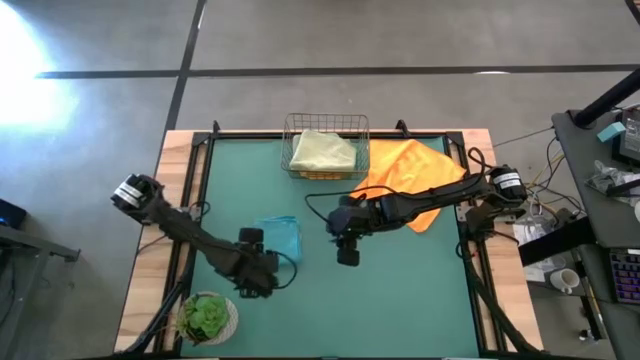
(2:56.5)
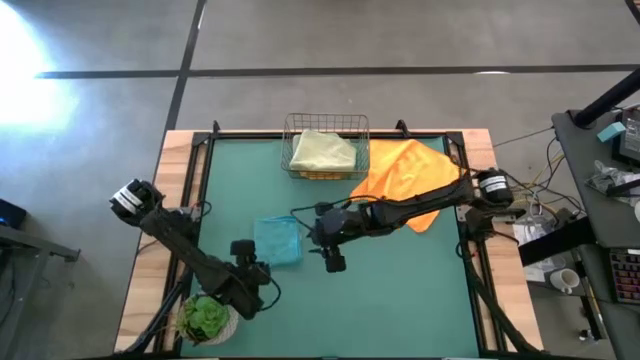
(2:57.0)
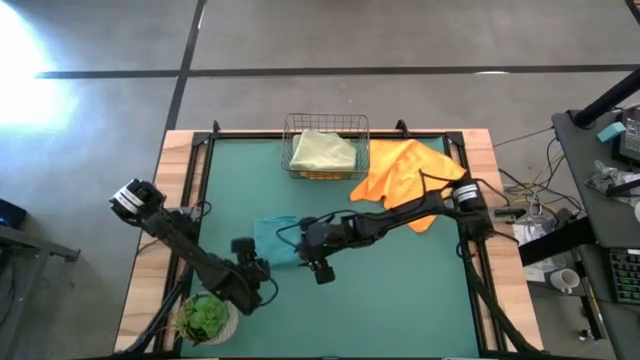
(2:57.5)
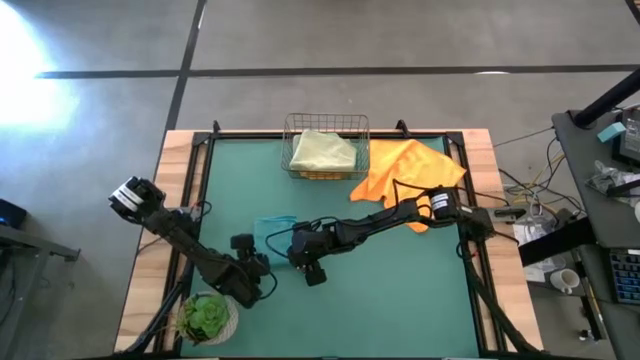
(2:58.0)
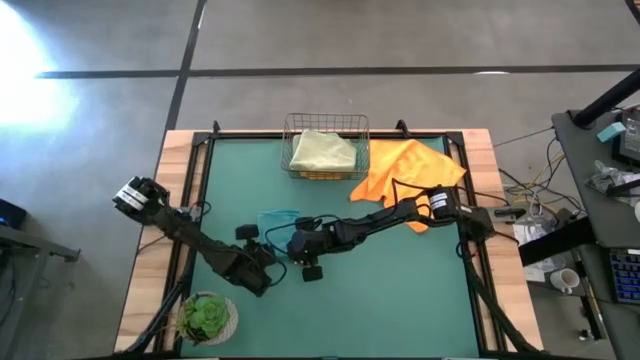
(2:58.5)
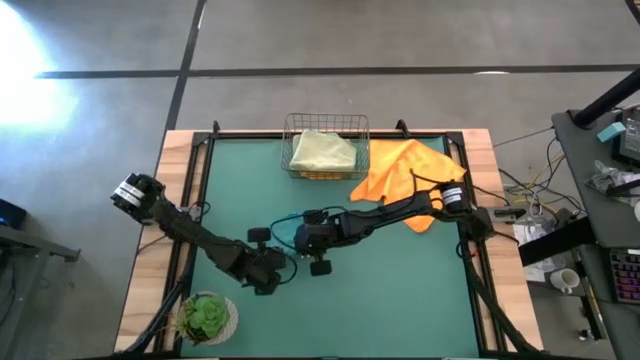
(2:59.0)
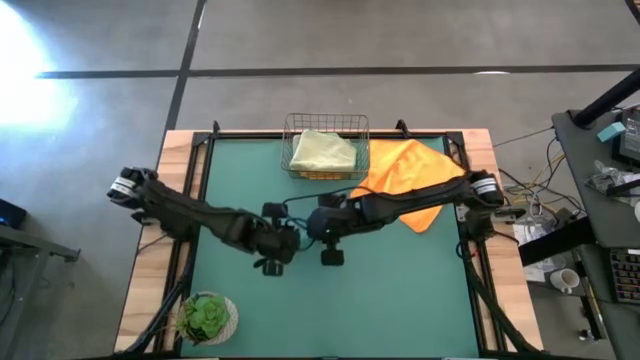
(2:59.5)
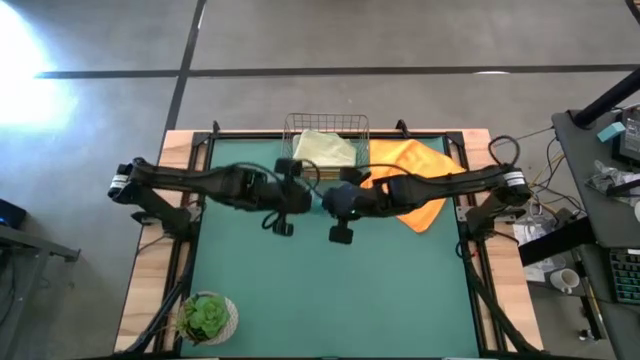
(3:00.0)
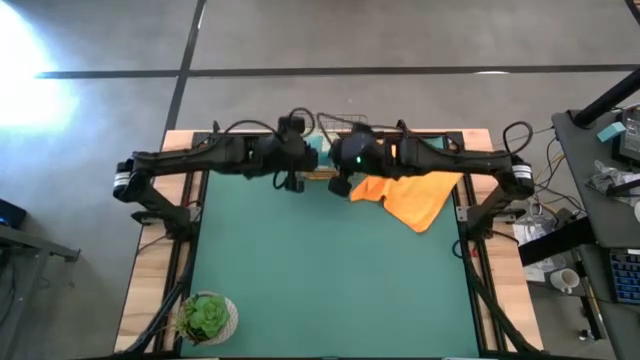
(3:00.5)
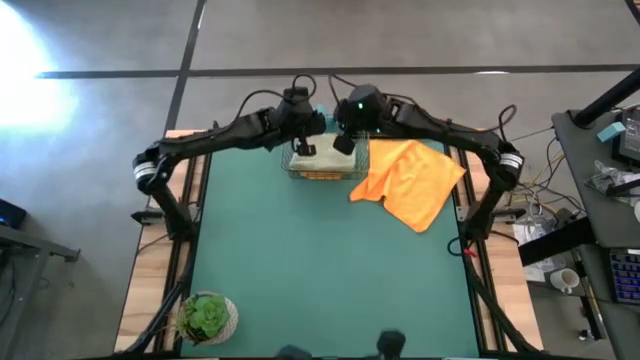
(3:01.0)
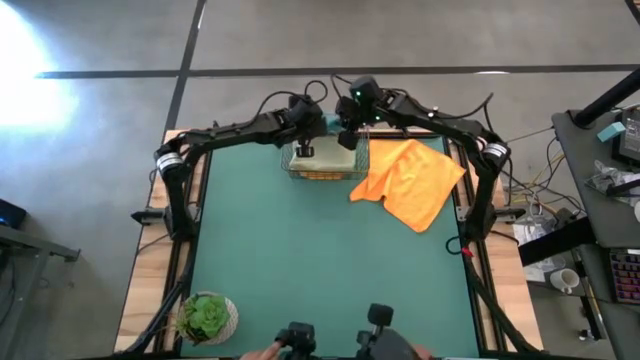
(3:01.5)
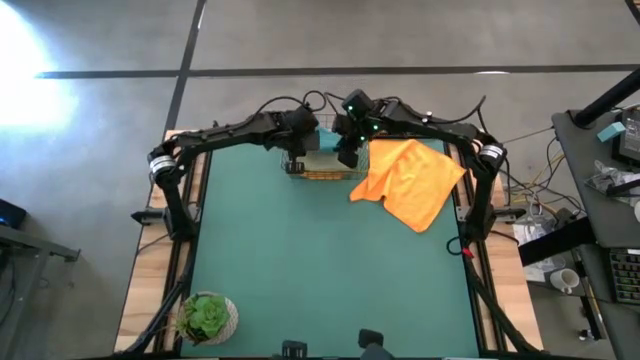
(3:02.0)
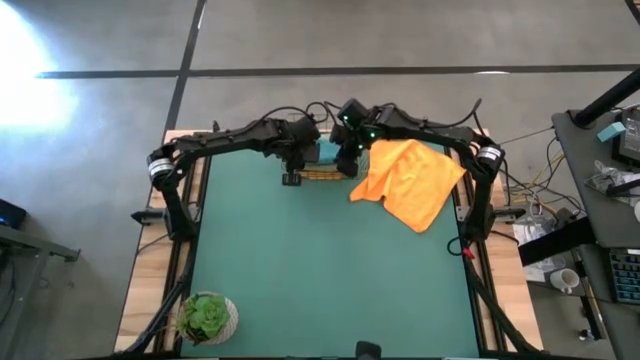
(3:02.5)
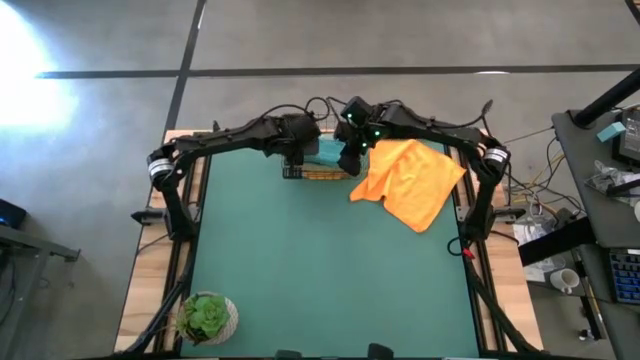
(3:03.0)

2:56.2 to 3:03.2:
Task: Fold microfiber towels
Put the blue microfiber towel into the wire basket

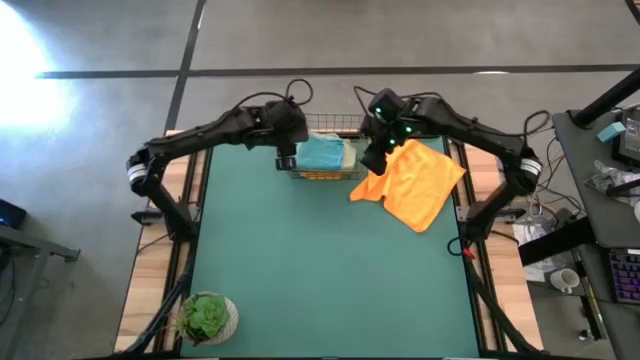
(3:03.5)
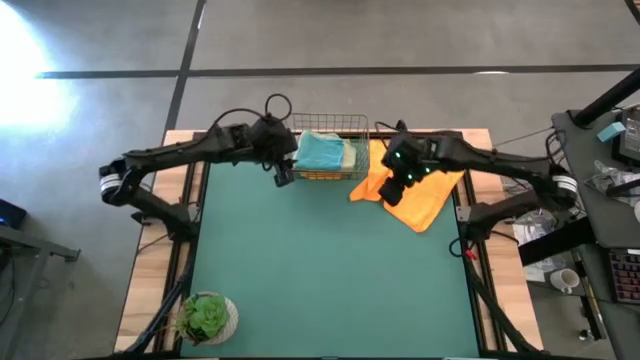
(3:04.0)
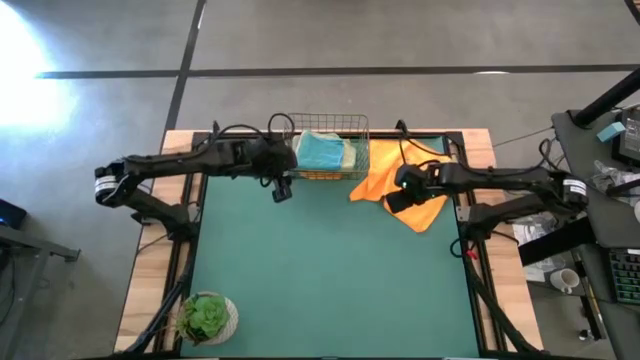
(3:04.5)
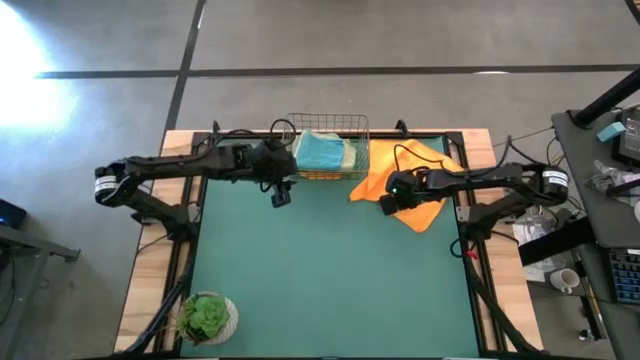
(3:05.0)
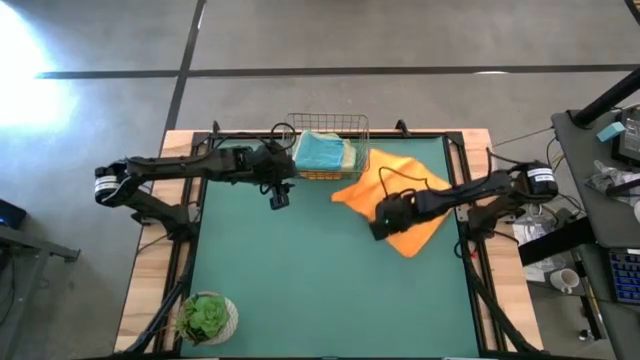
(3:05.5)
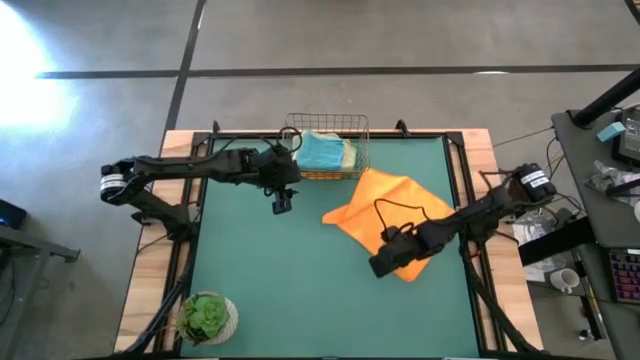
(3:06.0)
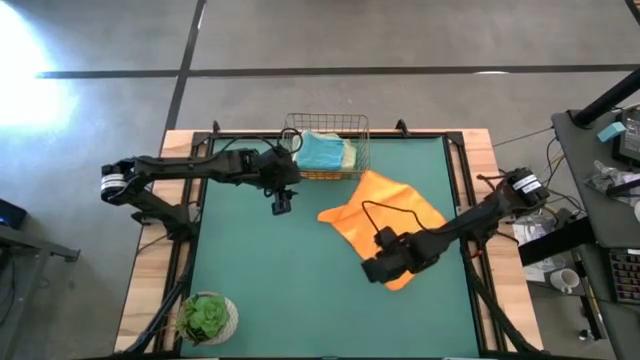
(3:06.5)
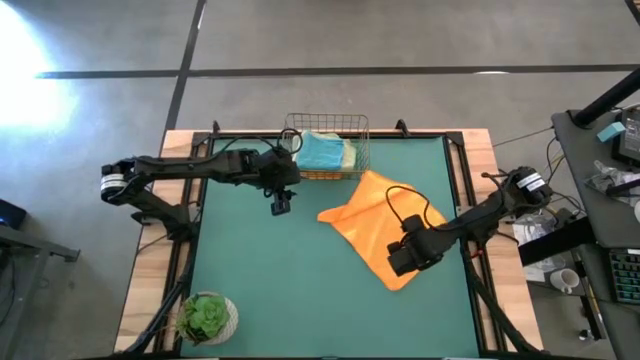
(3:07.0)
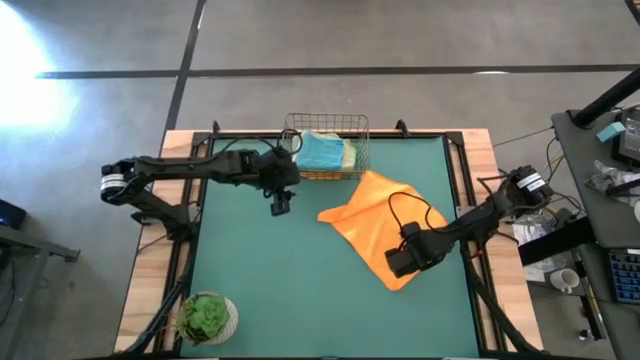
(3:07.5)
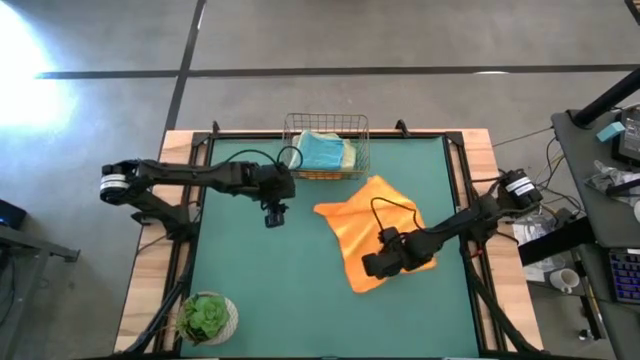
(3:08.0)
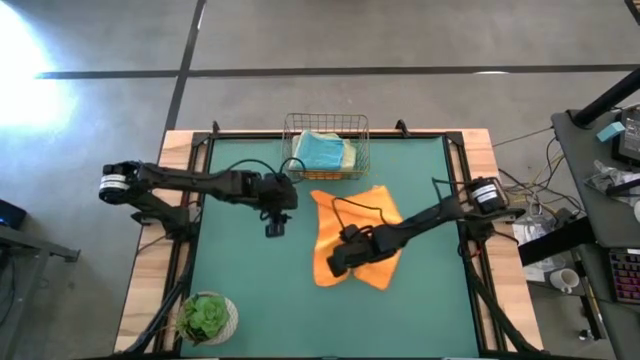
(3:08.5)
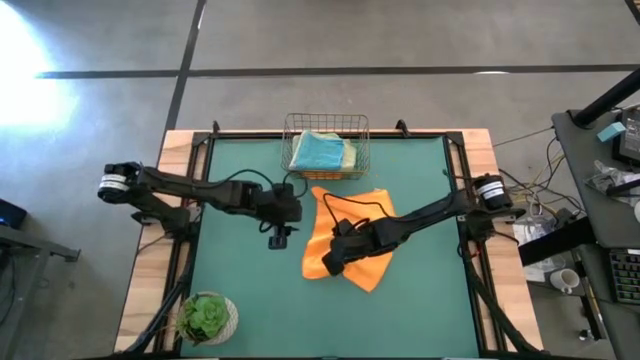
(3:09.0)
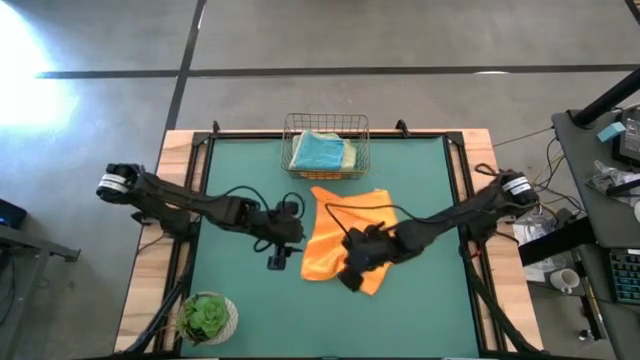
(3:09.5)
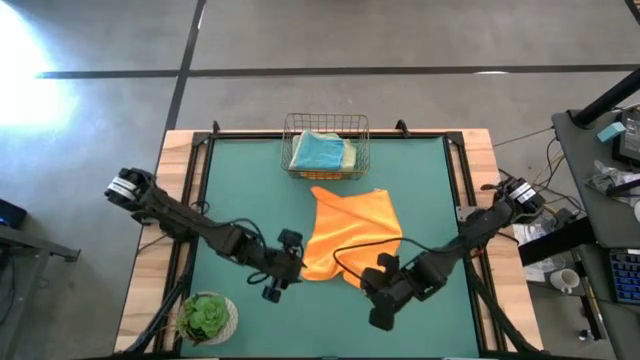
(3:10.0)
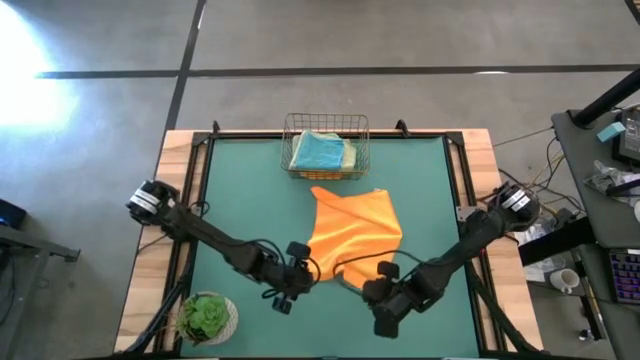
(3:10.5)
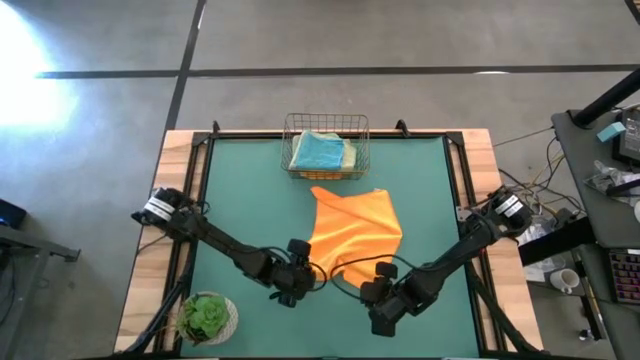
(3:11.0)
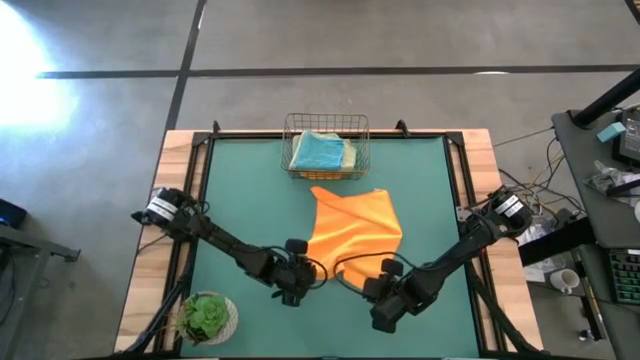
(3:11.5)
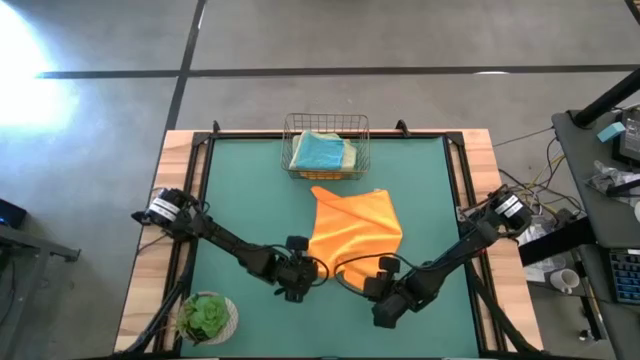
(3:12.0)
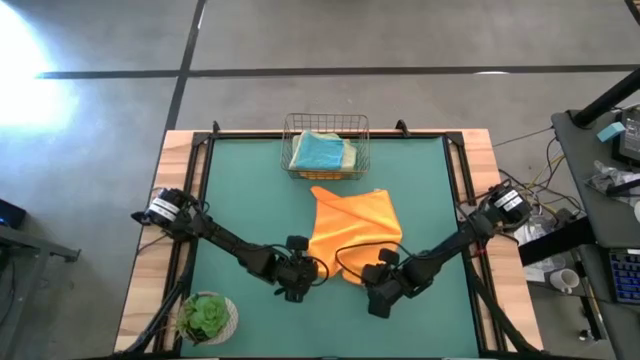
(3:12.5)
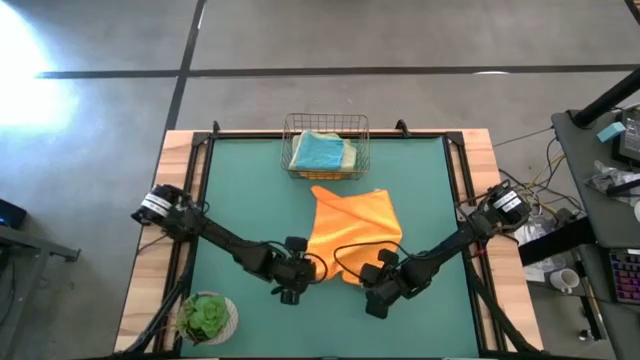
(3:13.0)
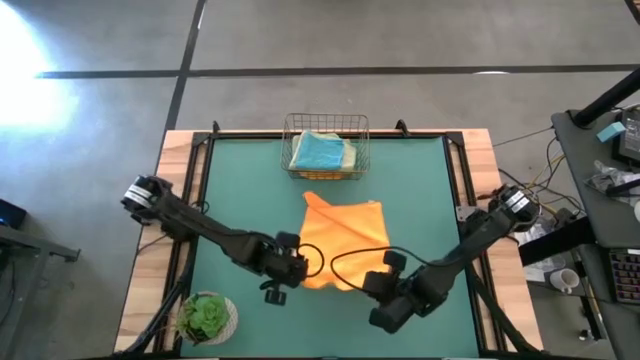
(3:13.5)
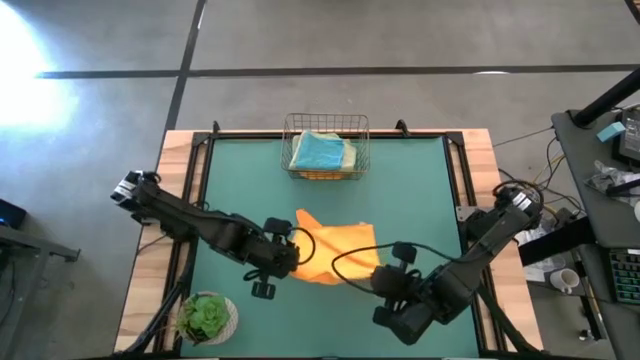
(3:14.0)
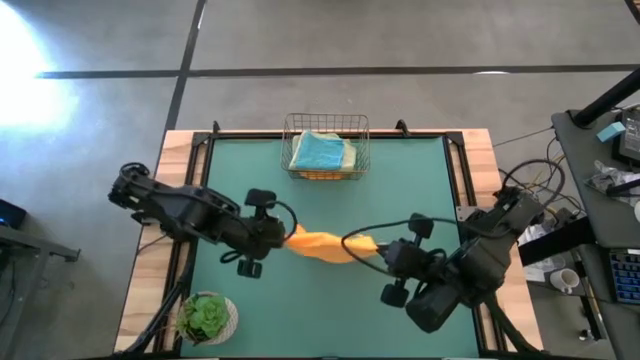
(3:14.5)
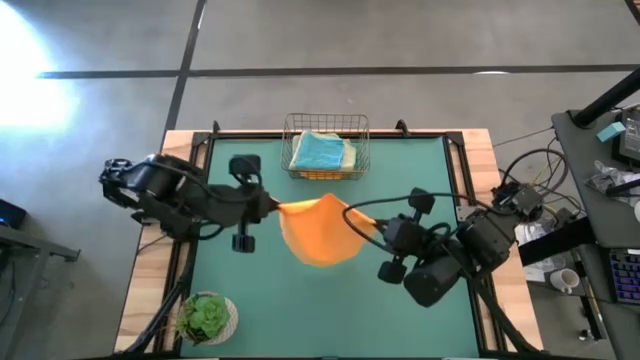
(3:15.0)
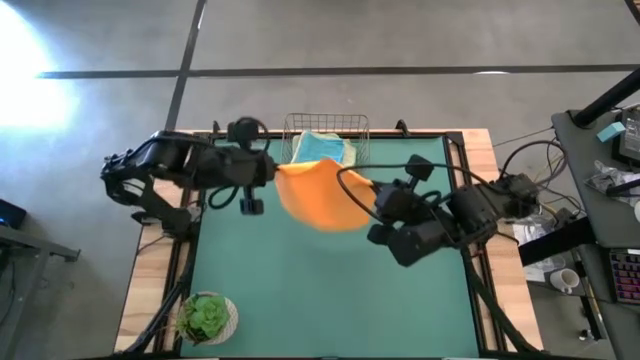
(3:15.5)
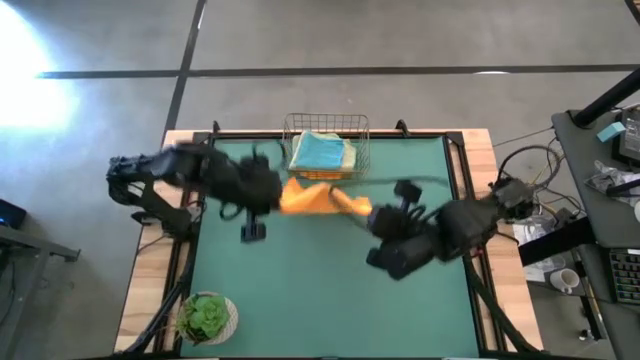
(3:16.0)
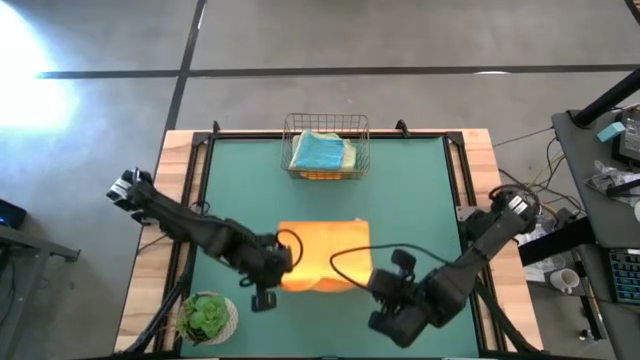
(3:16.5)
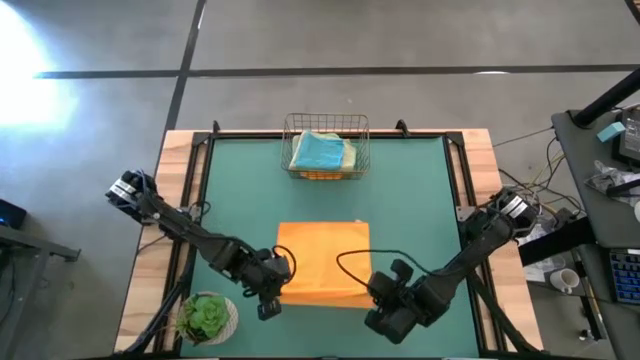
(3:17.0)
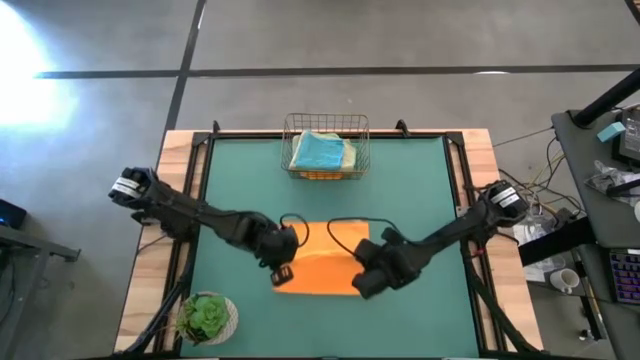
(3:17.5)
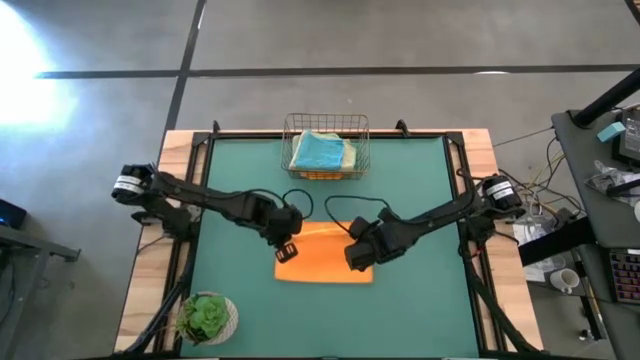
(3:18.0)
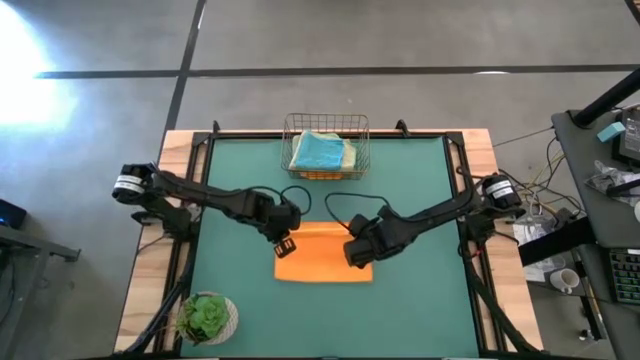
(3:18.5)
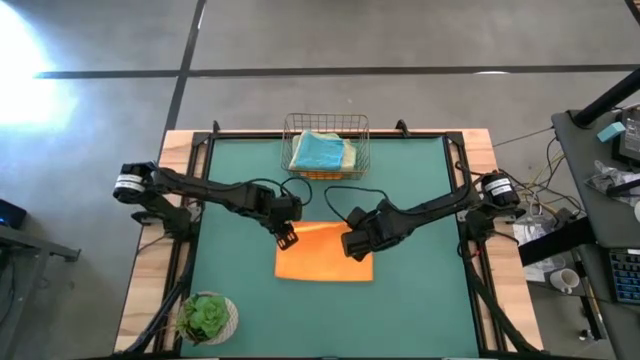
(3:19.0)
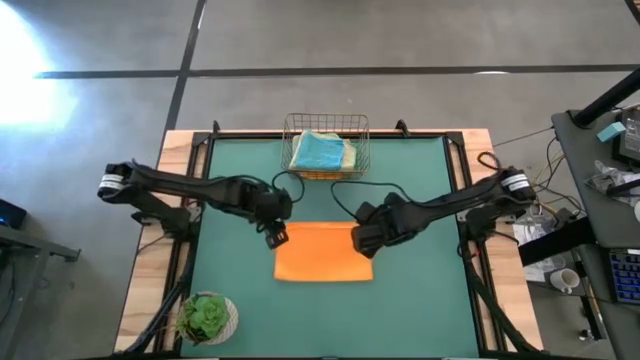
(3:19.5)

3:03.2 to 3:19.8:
Fold the orange microfiber towel
